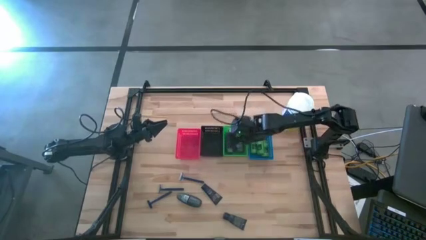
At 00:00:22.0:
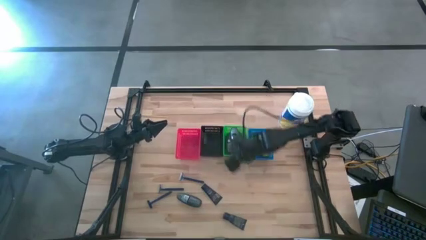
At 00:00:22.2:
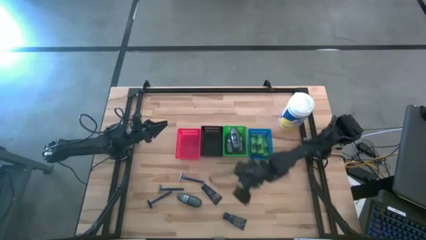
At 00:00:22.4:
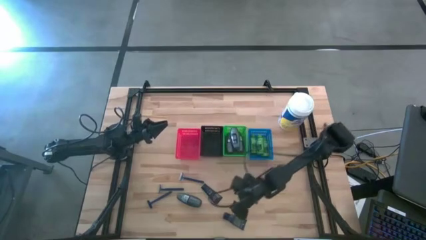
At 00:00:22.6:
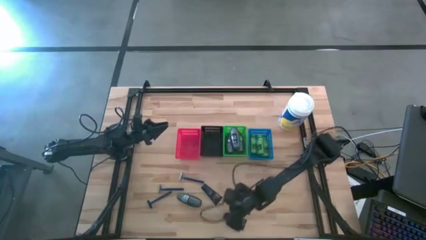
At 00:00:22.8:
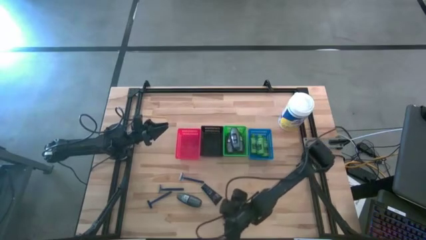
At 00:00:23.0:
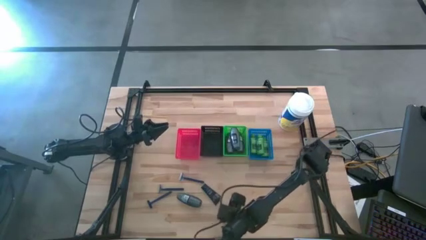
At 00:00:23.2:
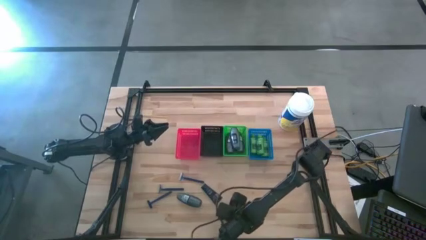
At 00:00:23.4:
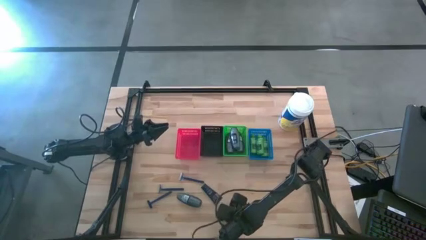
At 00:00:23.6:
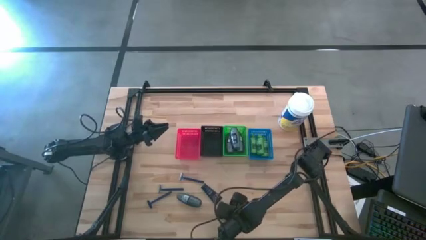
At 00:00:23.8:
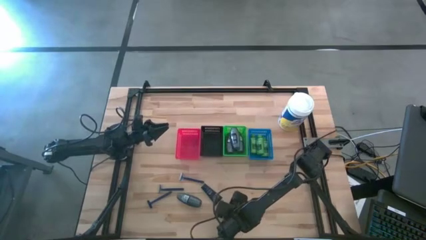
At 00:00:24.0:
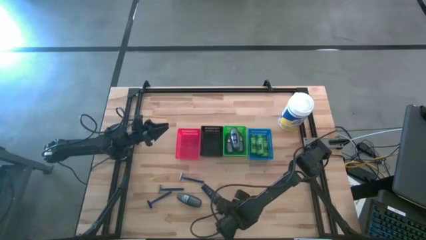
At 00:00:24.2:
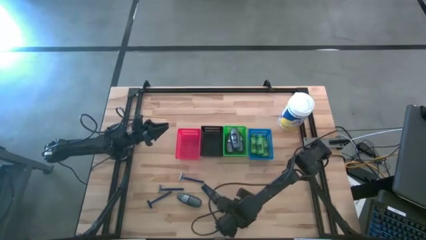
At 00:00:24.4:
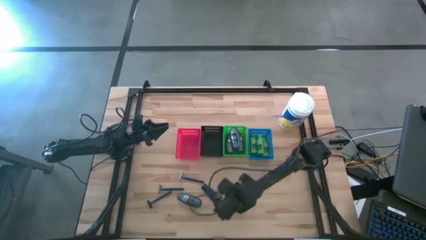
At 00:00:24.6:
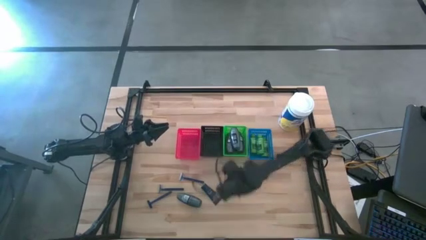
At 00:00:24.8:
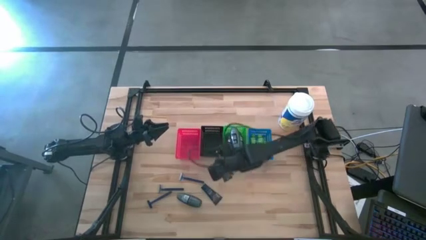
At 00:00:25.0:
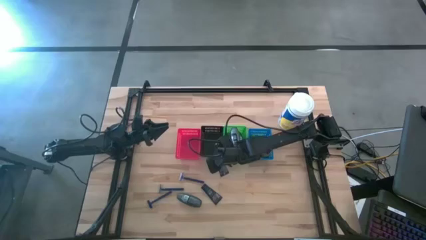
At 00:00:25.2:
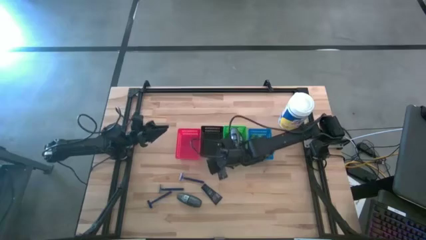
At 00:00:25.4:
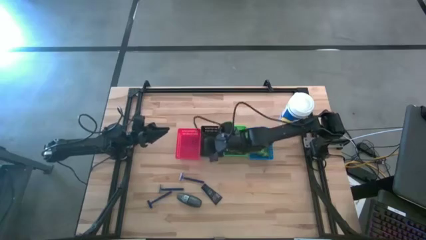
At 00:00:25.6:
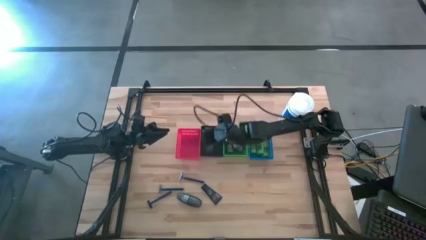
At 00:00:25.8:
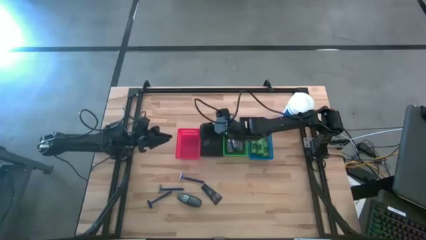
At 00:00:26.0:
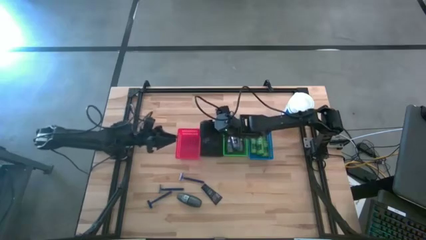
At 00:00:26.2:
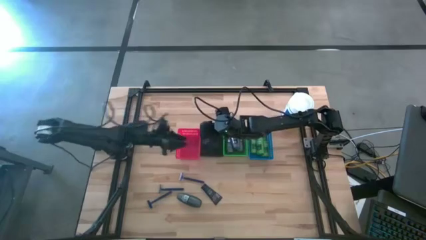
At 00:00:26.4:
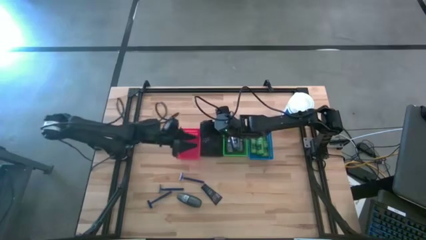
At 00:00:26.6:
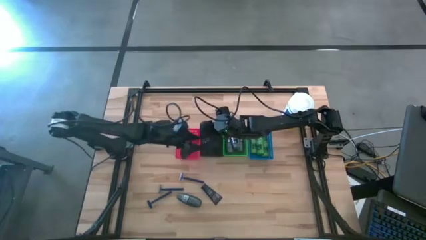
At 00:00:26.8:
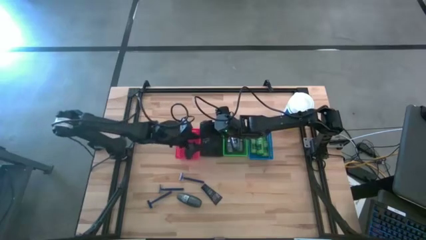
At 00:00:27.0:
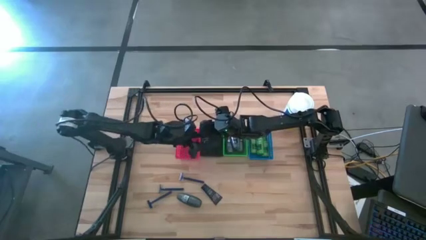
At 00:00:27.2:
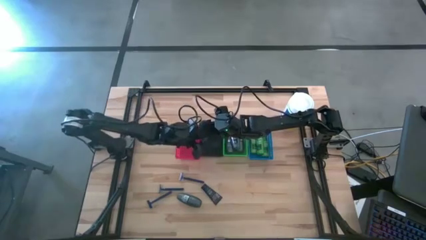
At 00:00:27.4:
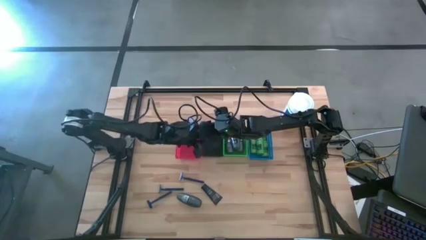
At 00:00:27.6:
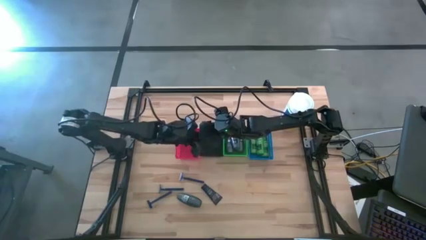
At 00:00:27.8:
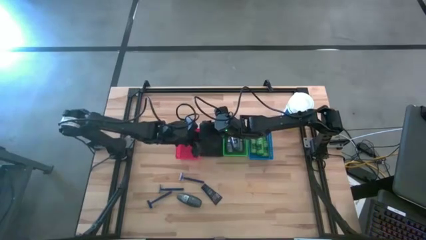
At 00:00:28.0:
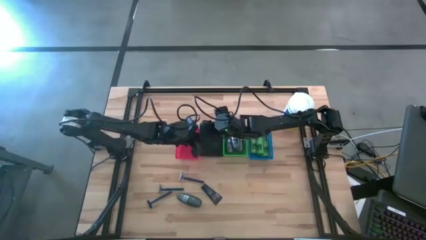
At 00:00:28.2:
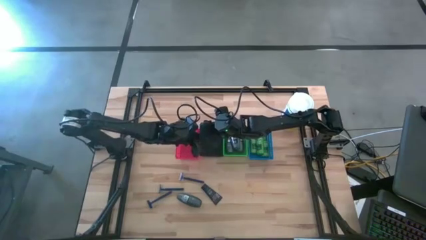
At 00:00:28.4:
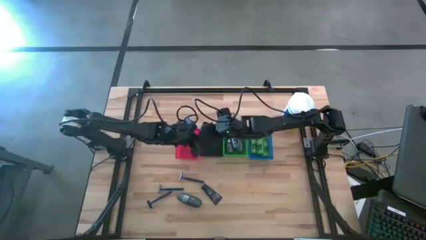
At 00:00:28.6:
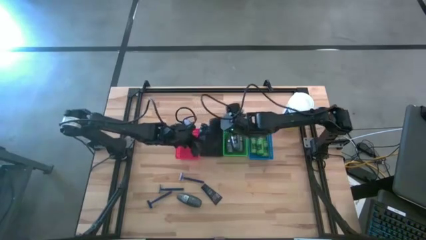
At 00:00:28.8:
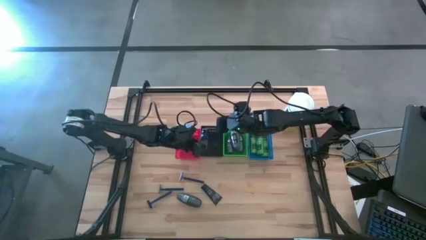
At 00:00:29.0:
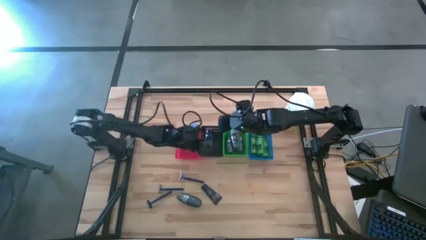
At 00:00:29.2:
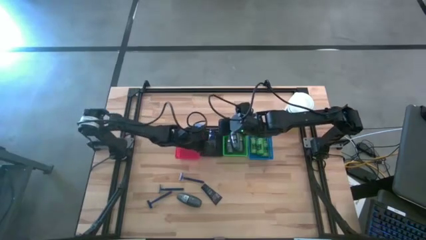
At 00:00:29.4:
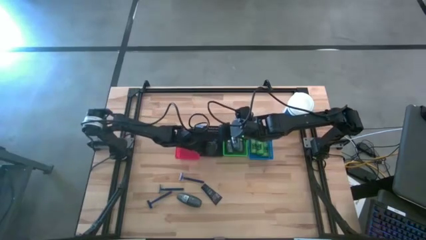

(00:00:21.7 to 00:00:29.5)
Task: Pick & Place Travel size toiletries
Put the blue shave cream into the black bin

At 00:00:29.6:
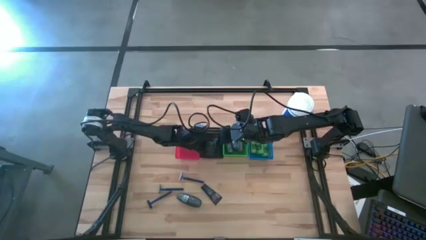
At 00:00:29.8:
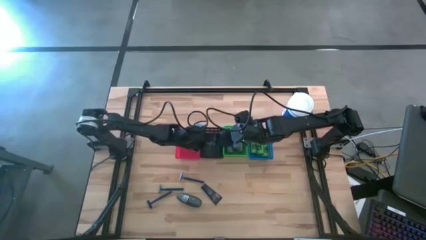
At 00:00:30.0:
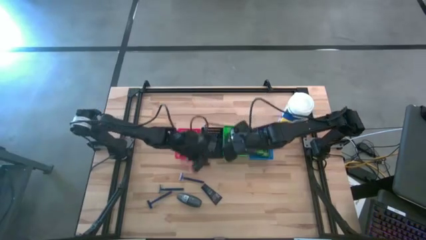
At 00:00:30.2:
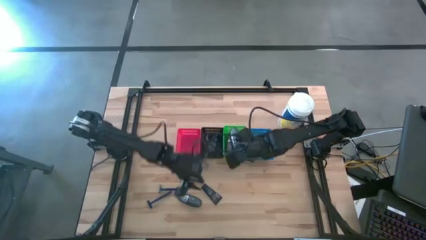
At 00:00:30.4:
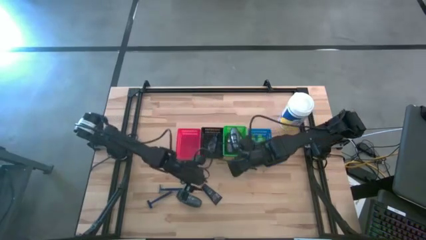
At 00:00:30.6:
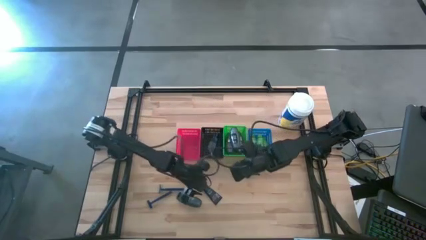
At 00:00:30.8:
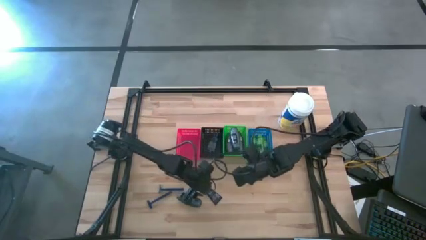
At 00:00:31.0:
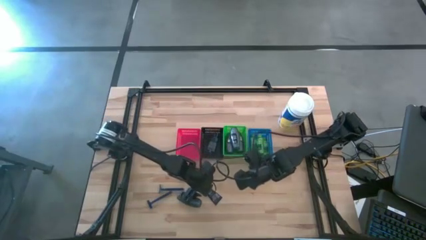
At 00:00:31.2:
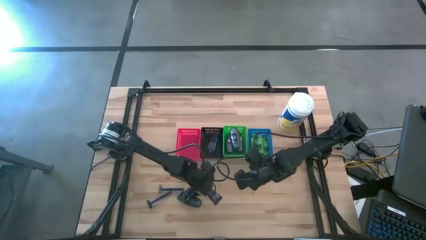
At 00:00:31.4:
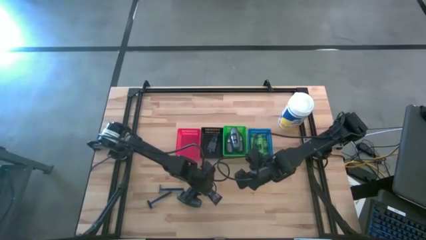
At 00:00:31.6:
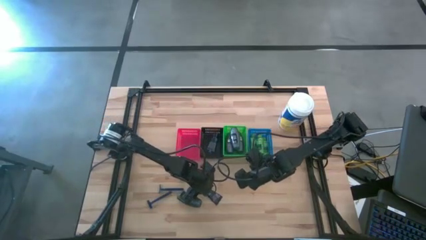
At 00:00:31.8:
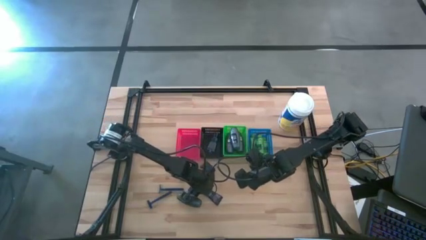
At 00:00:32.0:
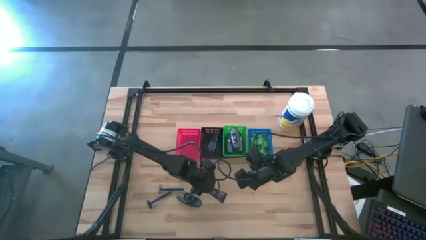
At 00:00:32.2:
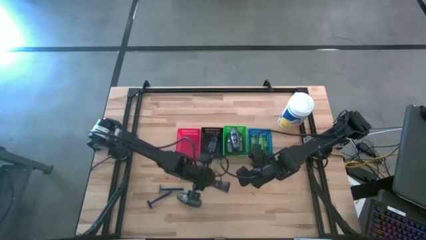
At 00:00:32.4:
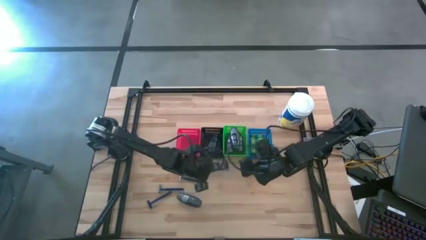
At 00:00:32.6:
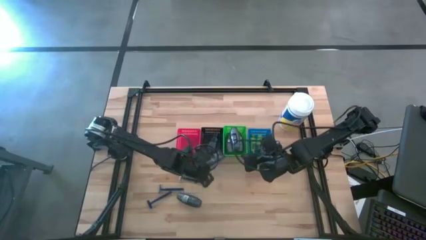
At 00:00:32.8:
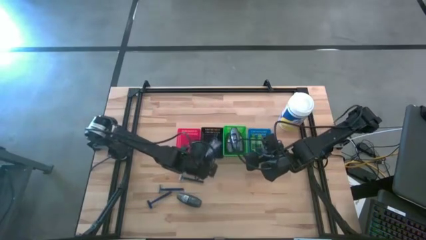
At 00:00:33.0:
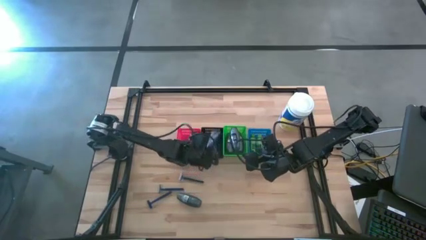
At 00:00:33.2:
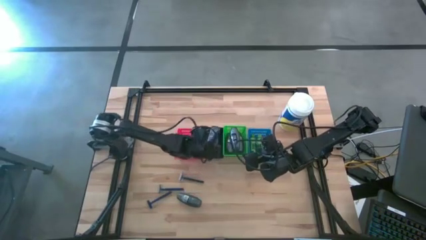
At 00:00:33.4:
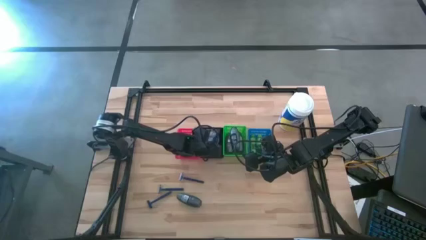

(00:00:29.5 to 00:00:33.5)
Put the blue shave cream into the black bin

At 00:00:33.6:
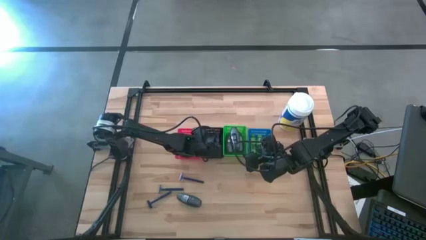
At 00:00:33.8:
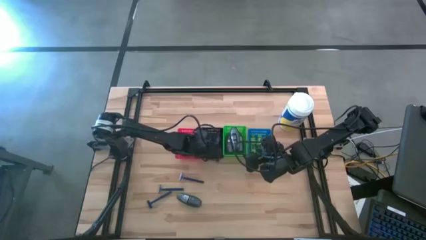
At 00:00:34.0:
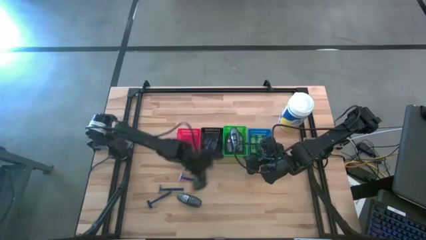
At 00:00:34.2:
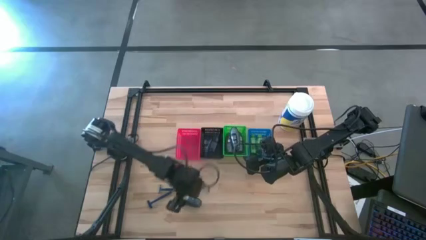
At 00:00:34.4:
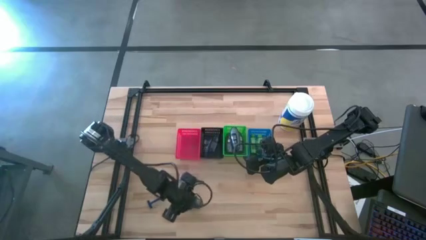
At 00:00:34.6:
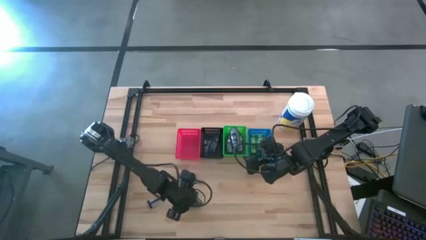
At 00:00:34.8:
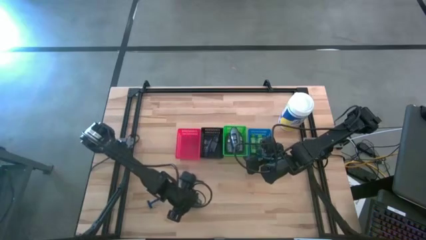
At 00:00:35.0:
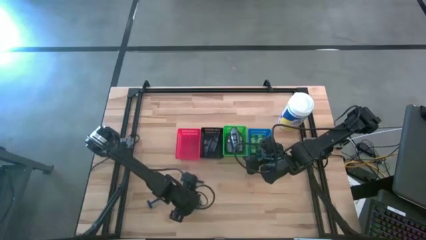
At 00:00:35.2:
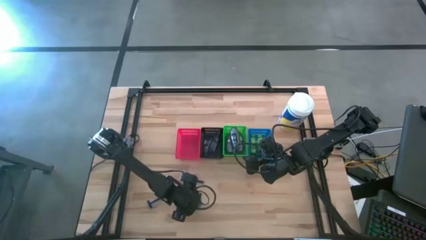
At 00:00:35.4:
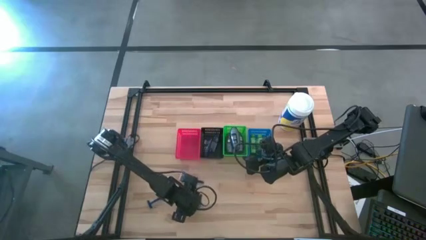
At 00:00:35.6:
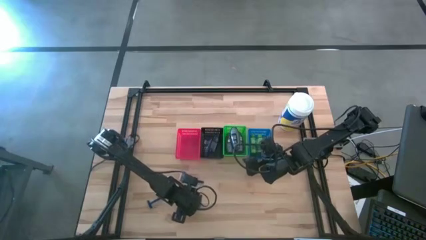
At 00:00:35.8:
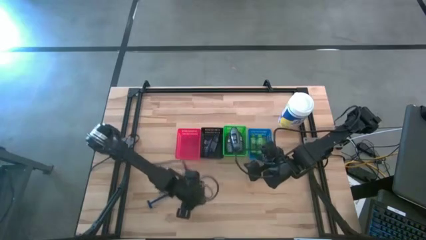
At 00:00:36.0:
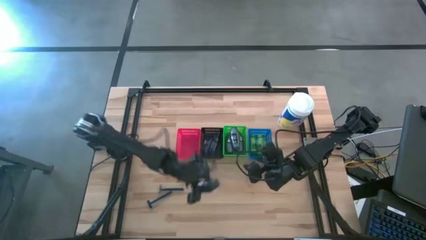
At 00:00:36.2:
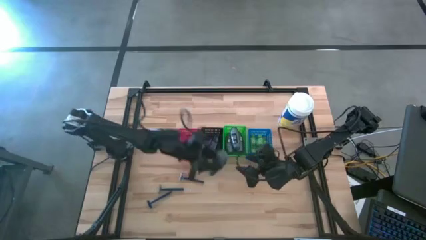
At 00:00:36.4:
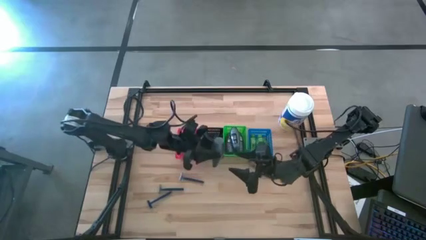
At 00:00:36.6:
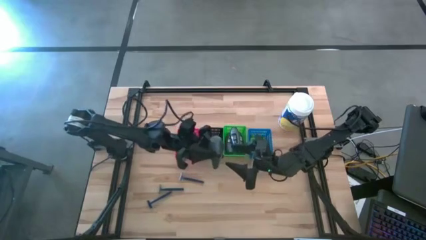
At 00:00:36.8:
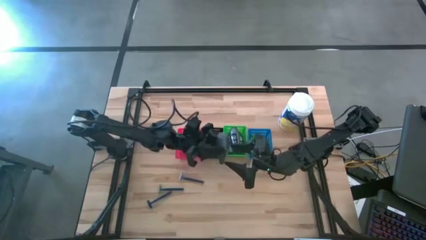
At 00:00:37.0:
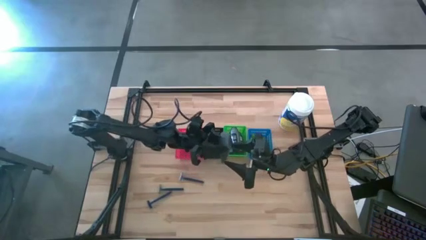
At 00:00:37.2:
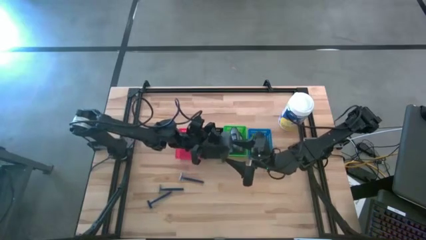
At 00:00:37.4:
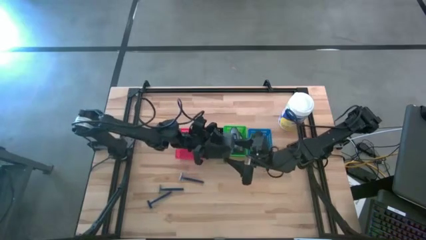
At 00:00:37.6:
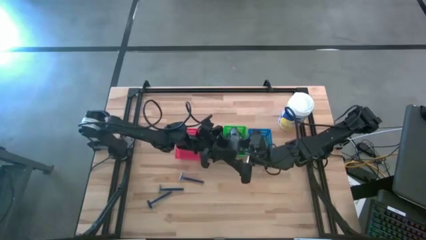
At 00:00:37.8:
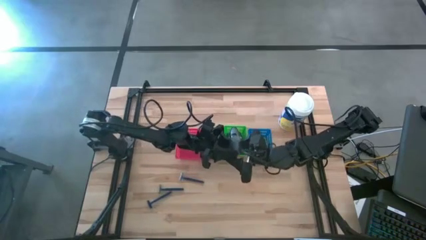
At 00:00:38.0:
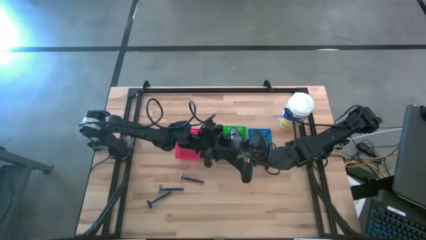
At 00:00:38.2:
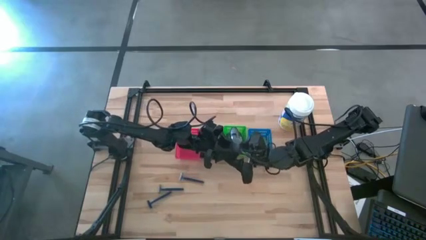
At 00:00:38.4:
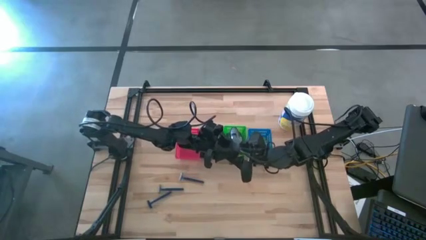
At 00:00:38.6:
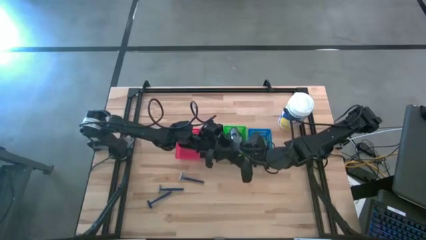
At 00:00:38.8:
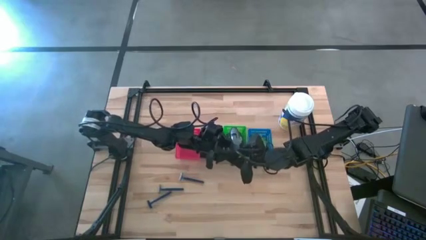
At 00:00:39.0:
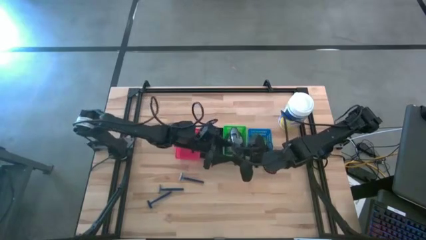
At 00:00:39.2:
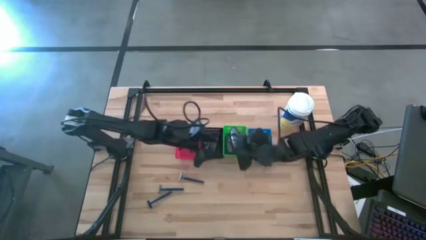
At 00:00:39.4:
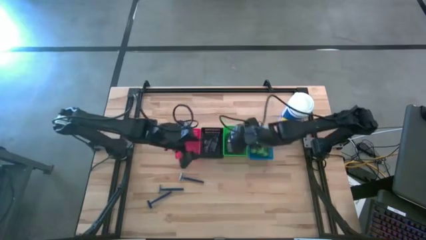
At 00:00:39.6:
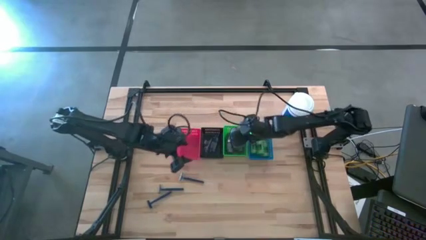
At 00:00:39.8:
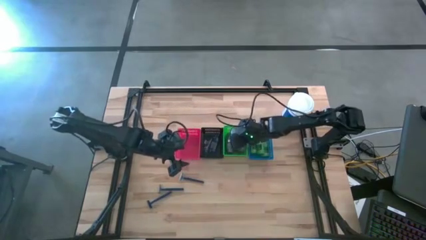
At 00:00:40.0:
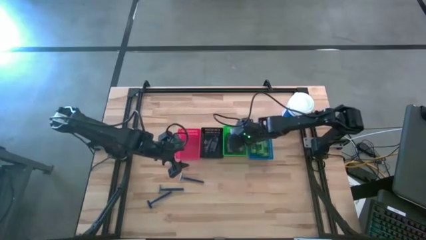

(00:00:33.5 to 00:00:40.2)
Put the black deodorant into the green bin
